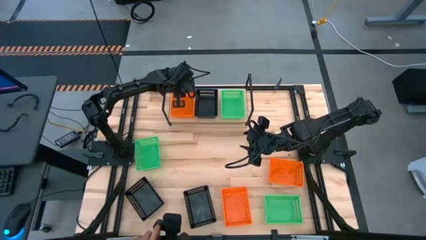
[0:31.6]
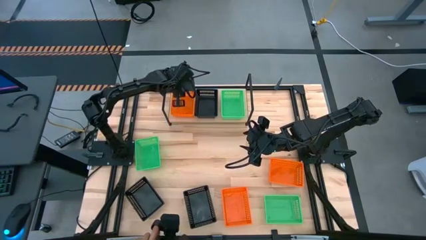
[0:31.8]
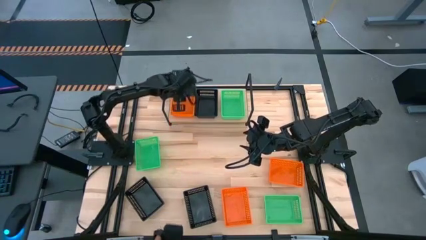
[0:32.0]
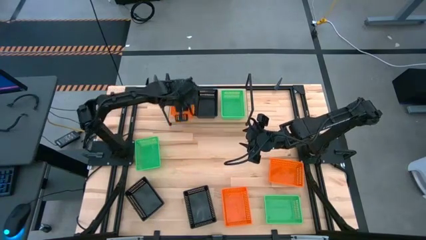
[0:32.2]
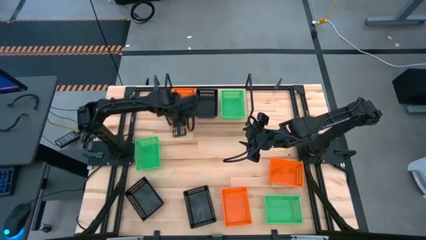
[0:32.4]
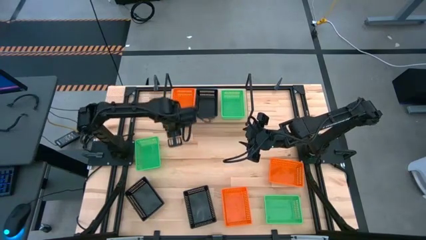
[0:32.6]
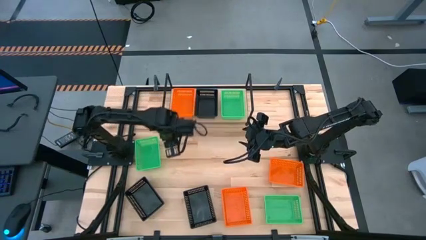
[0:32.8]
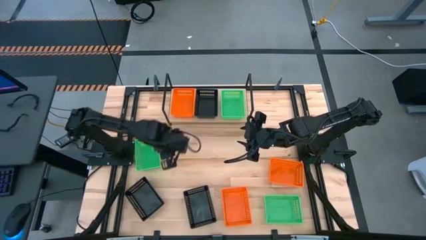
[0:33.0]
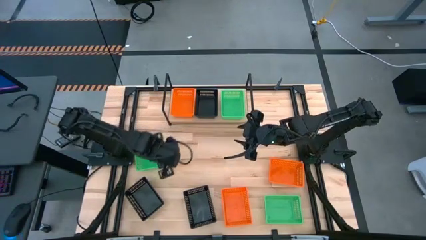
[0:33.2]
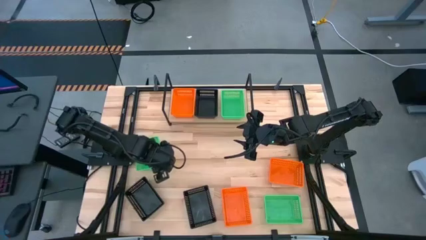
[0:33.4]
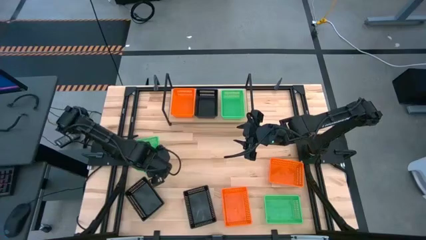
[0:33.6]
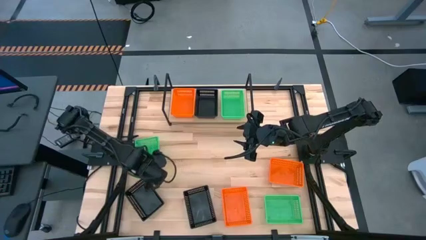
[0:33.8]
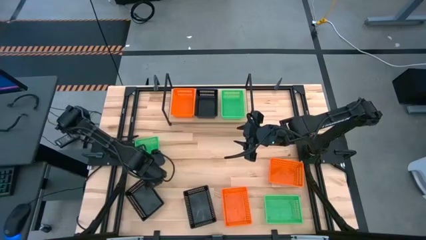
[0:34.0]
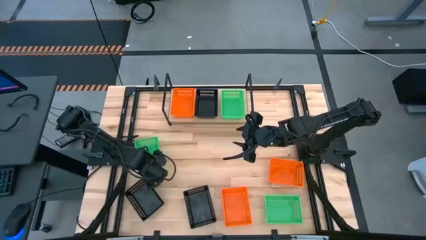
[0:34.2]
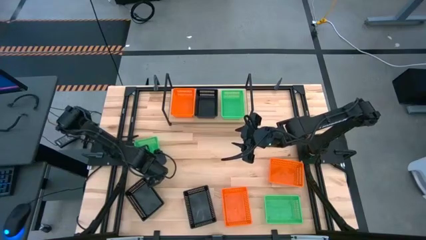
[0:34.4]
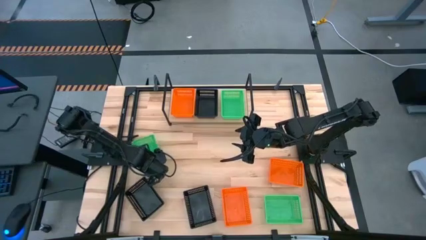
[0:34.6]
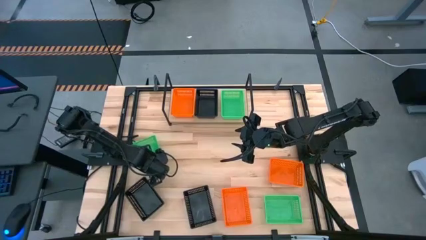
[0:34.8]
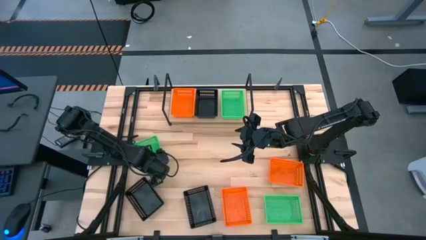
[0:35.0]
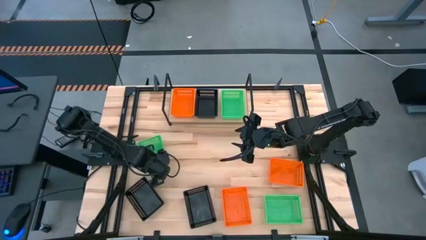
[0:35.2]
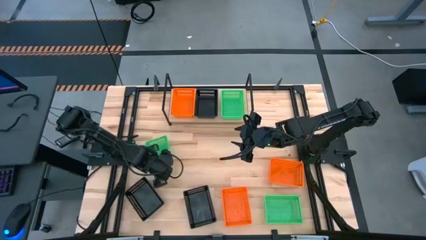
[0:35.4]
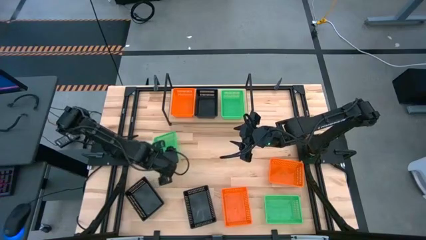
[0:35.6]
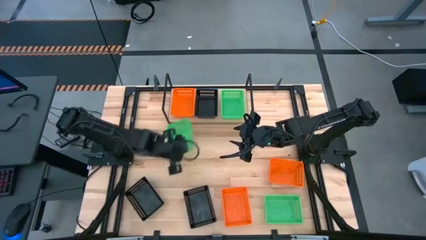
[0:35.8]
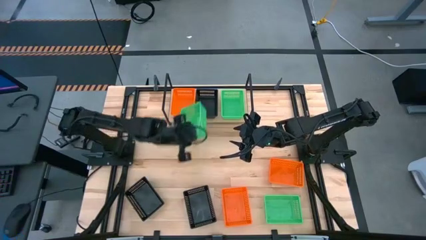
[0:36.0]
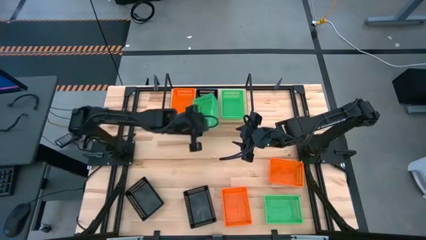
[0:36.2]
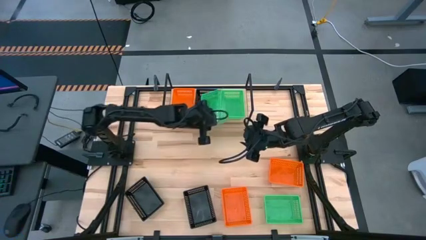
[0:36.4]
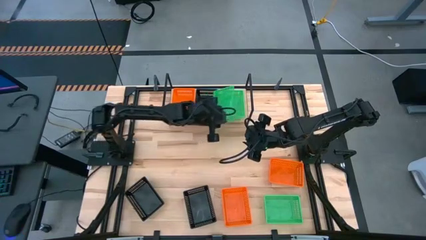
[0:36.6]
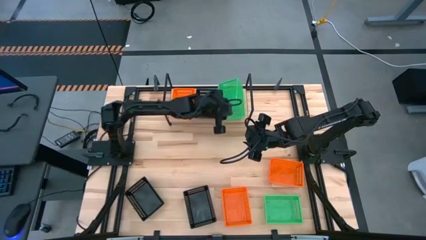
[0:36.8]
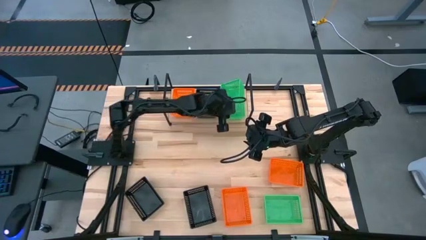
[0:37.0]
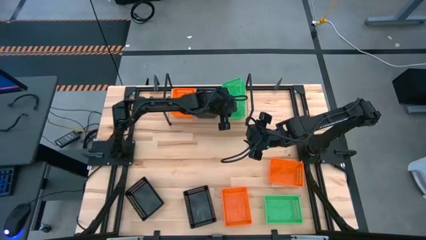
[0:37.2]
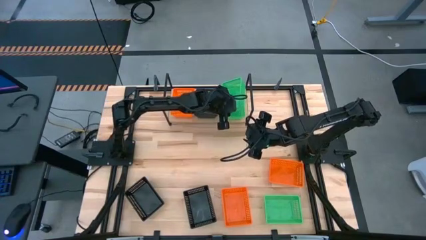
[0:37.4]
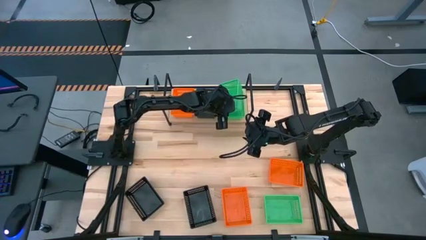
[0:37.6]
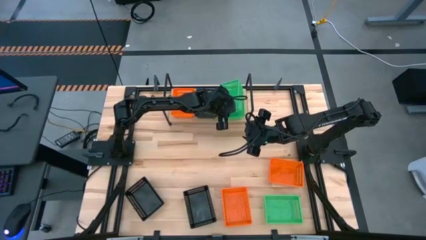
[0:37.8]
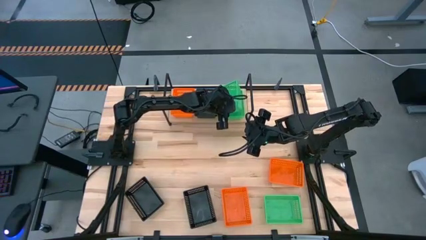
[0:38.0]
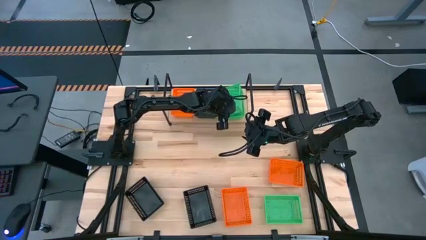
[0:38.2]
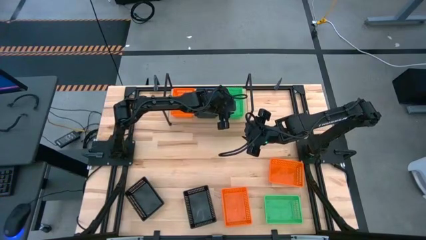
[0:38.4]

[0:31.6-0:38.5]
Task: Stack baskets on shelf by color
Stack the top green bin on top of the green bin on the shelf

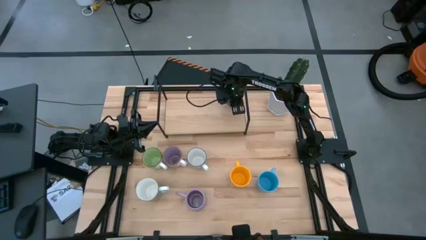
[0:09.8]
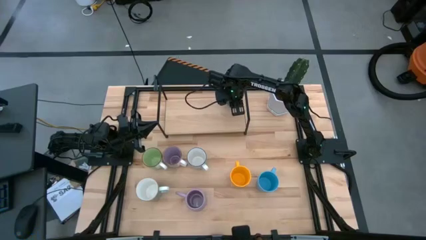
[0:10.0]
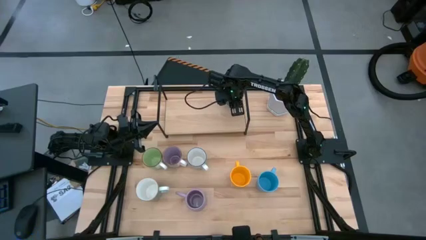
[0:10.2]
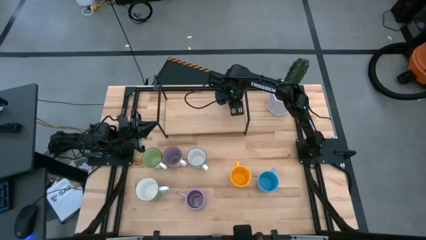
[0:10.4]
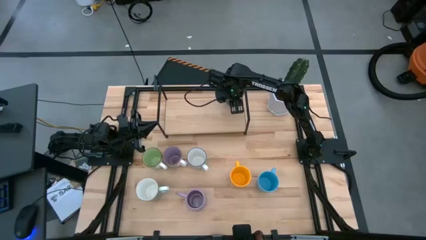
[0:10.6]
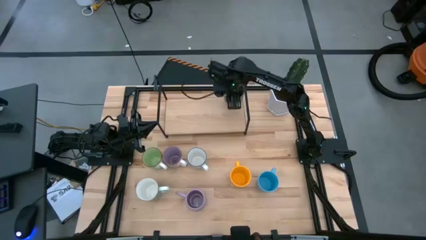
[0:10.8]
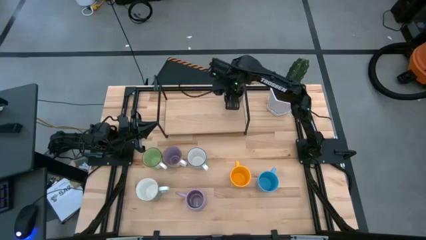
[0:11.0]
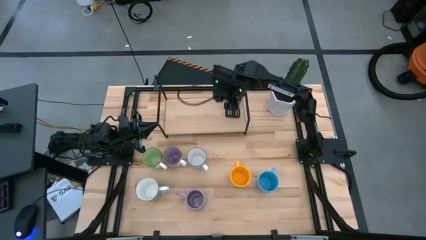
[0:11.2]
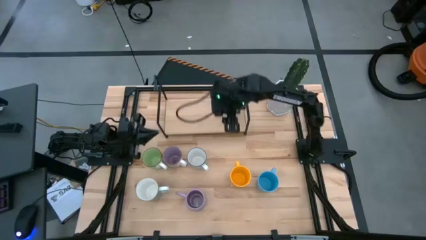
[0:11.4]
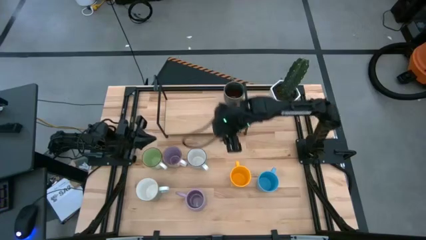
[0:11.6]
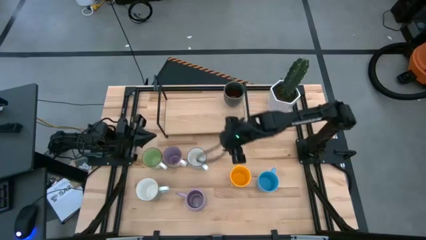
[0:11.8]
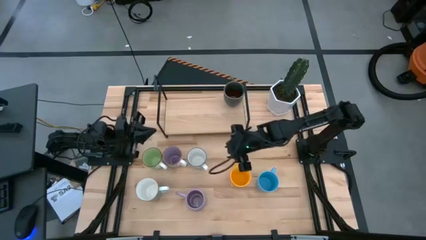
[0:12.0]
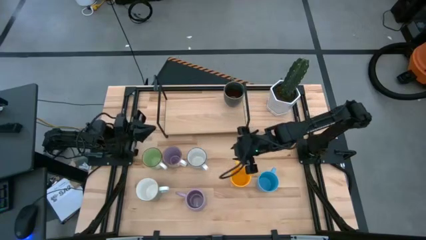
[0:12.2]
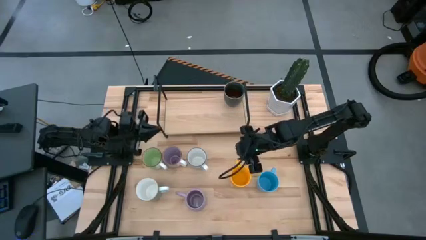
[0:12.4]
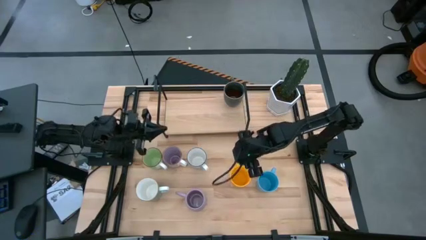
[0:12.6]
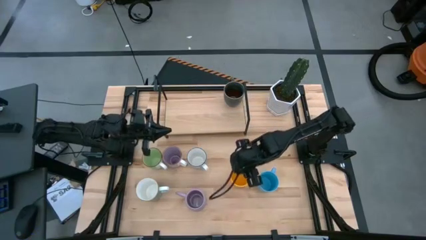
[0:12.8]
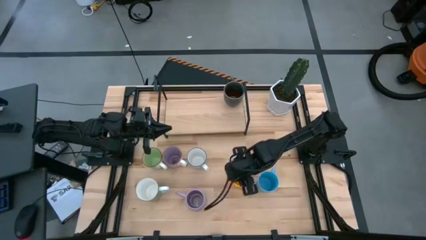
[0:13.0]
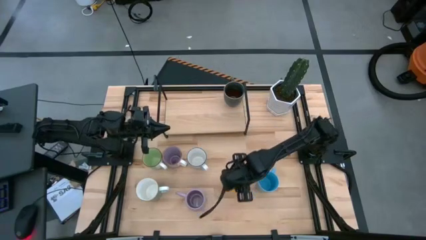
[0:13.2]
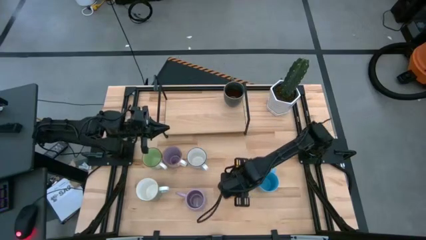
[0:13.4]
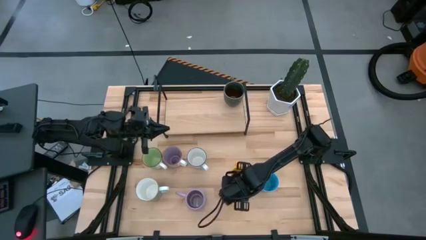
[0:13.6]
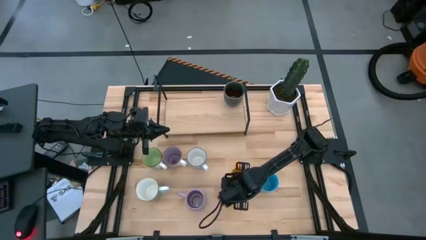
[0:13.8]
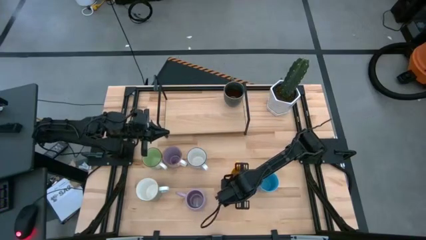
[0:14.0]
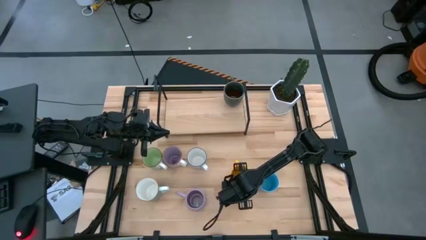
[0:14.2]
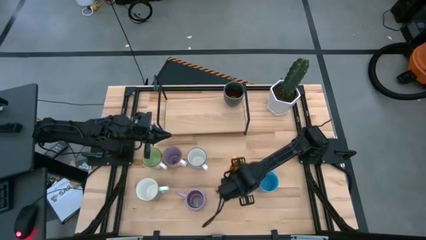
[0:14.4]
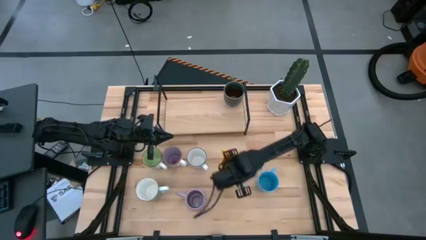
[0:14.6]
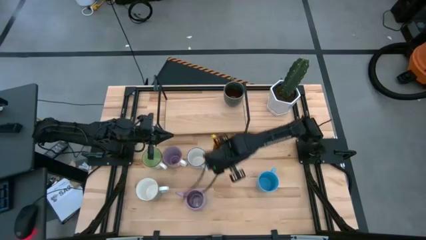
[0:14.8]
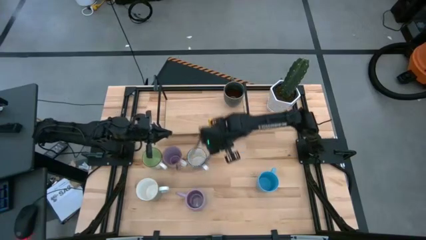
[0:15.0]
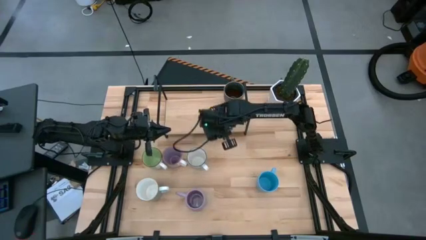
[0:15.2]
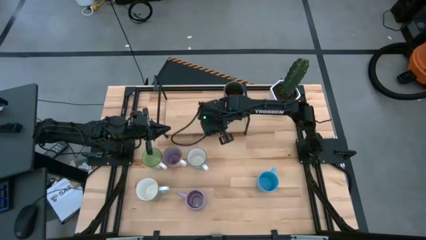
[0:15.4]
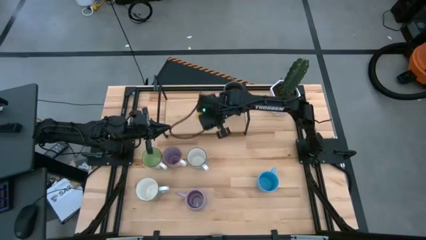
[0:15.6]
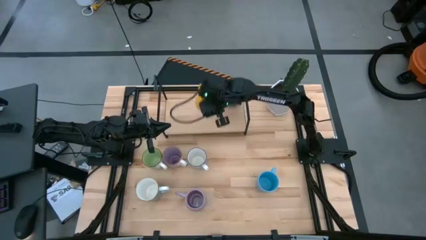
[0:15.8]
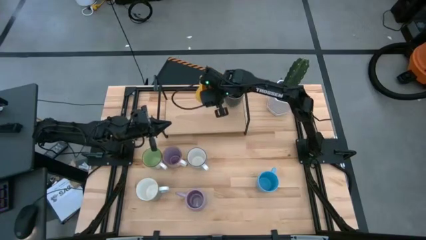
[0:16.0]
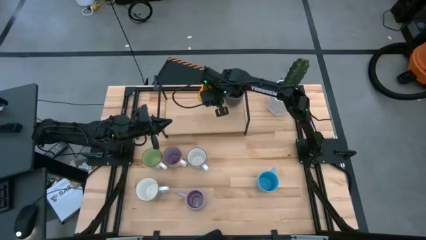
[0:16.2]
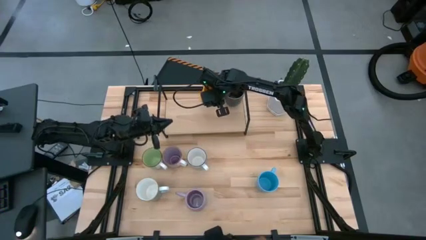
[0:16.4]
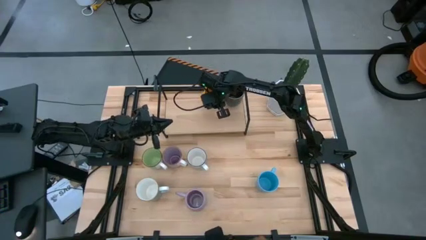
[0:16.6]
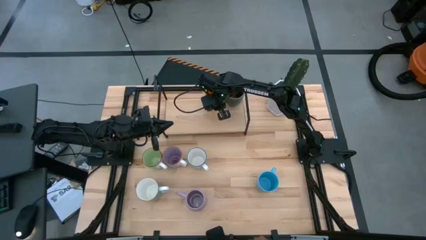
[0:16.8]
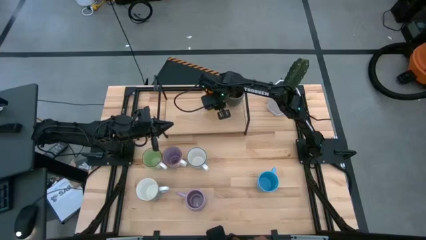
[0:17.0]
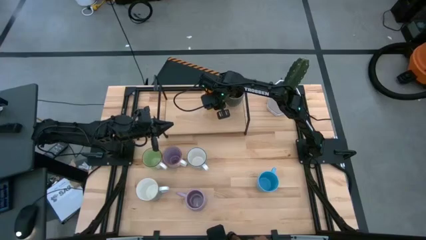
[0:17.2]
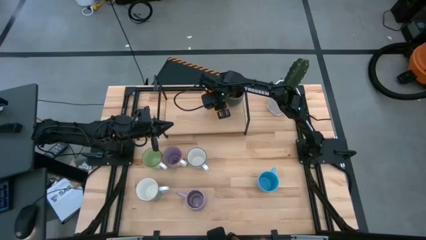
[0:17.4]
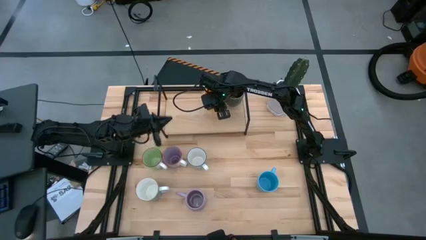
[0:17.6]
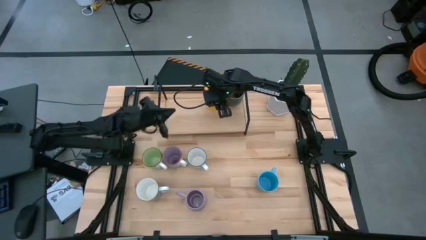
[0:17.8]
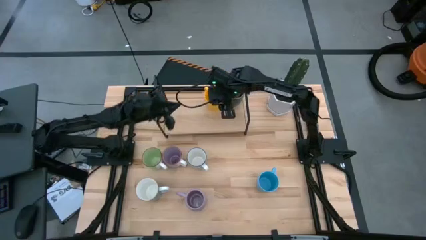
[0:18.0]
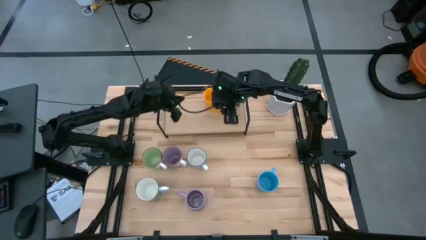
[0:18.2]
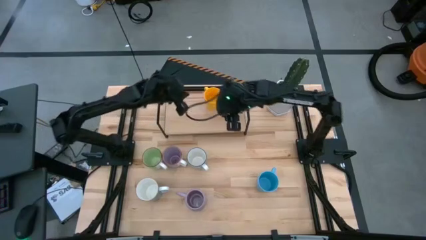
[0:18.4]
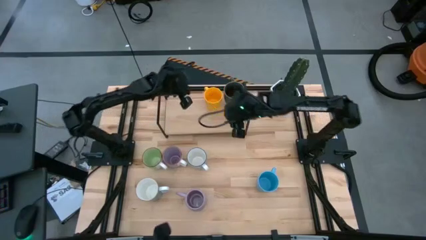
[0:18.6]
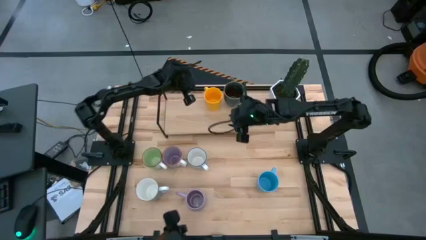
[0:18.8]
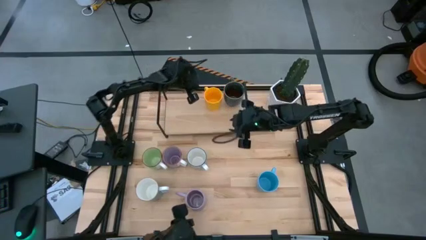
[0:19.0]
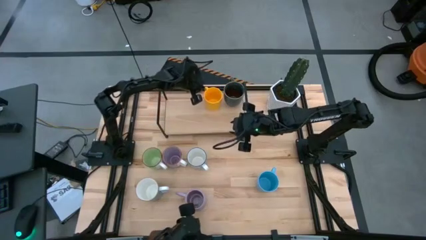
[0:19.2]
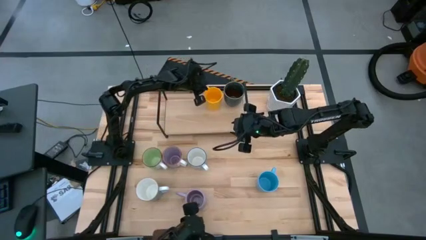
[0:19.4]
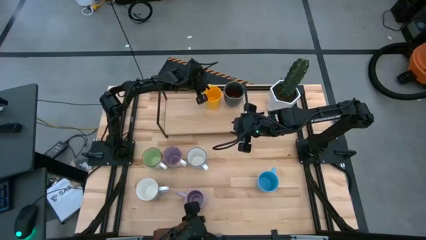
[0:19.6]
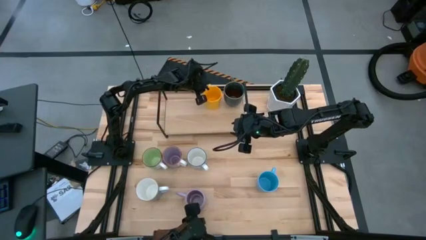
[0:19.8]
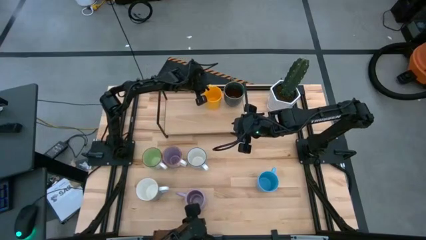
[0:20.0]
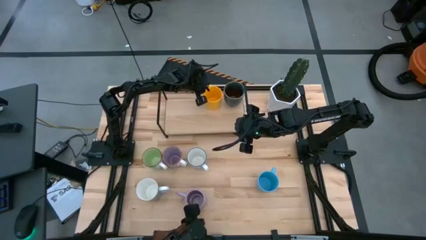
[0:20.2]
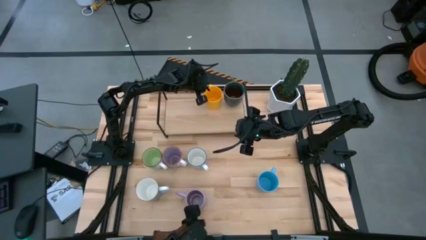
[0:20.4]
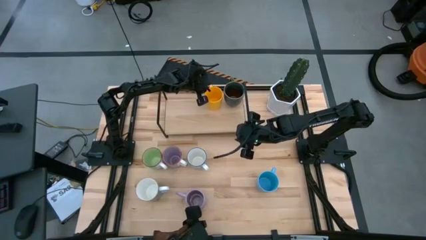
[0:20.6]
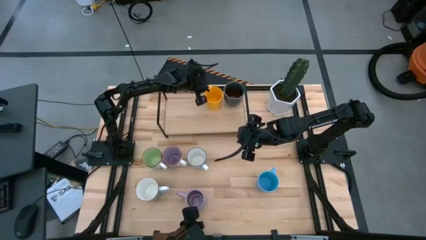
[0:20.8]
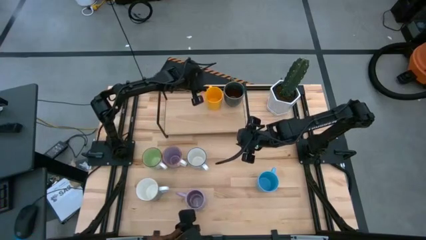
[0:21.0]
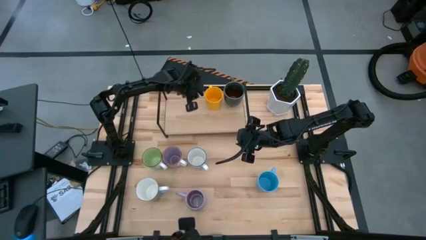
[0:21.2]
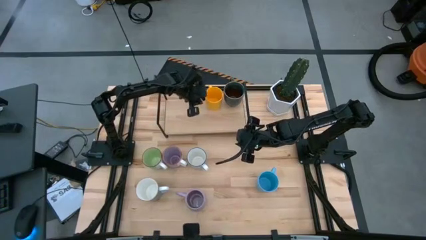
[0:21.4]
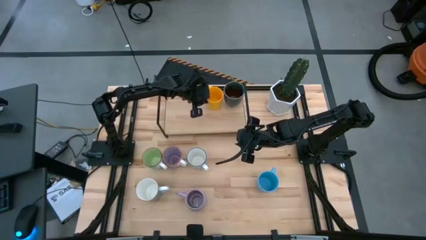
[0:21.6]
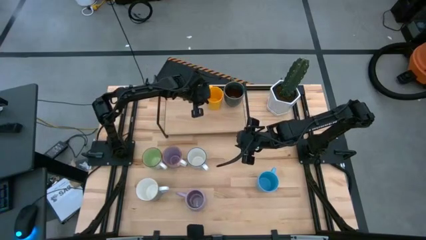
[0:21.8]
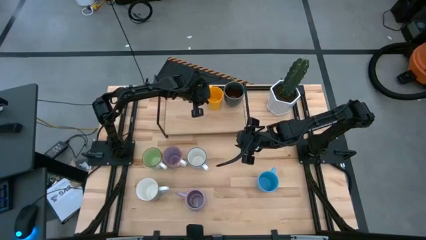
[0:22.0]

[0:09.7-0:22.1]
Task: Place coffee mugs
Put the yellow mug on the shelf
